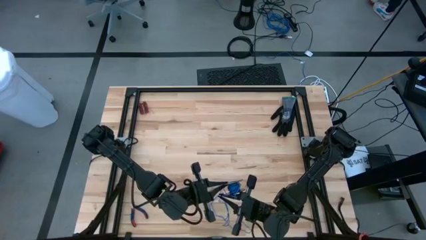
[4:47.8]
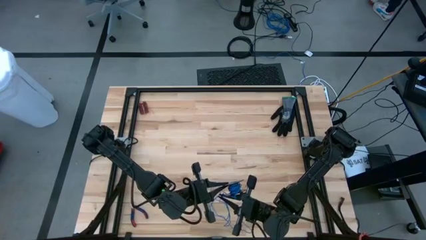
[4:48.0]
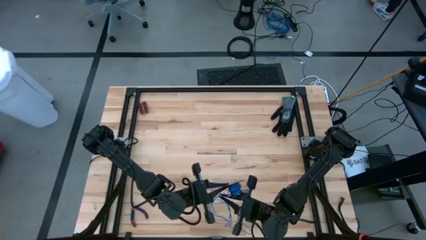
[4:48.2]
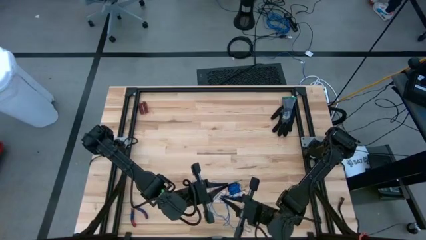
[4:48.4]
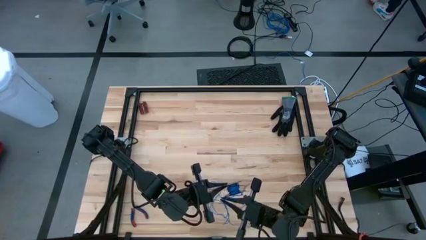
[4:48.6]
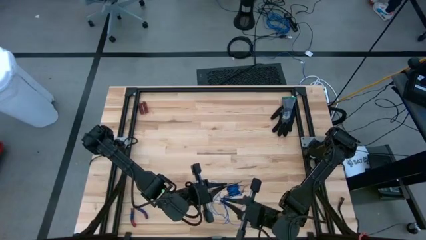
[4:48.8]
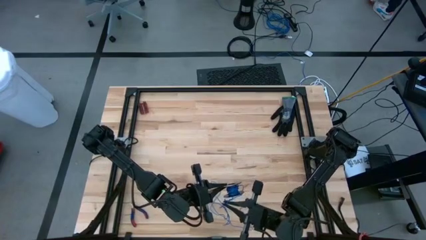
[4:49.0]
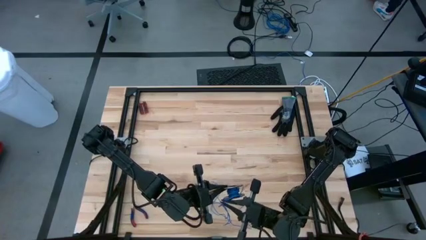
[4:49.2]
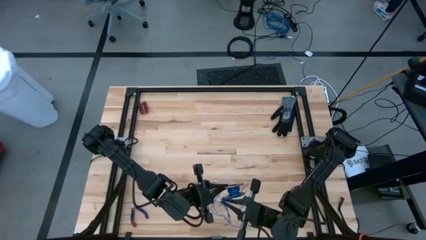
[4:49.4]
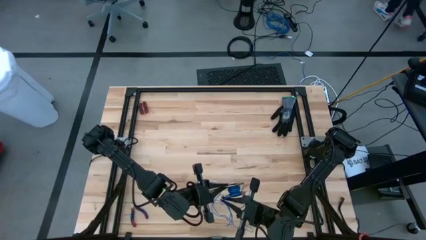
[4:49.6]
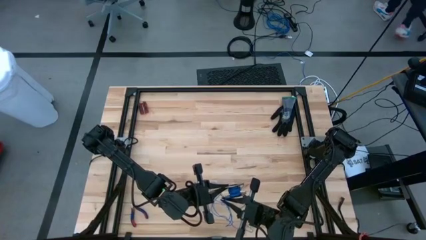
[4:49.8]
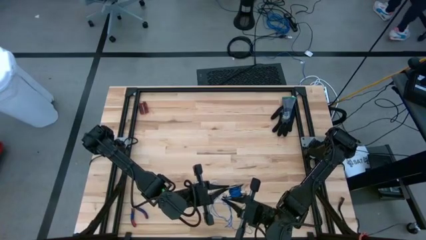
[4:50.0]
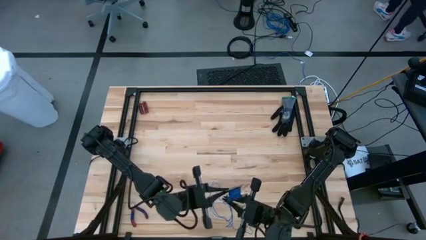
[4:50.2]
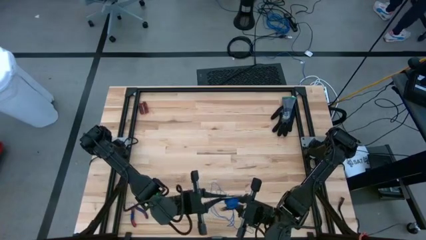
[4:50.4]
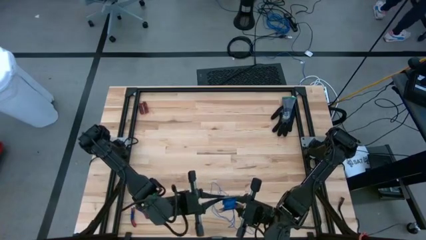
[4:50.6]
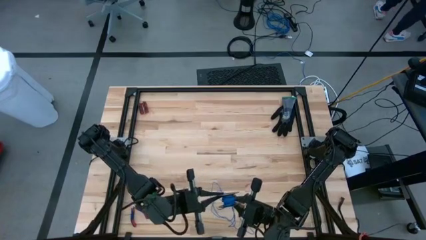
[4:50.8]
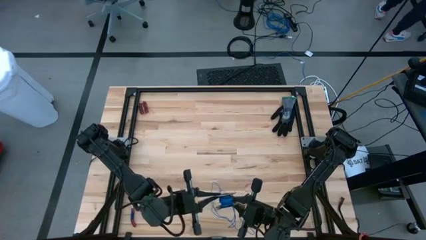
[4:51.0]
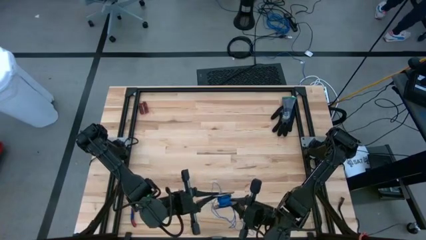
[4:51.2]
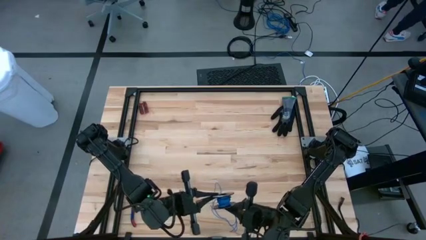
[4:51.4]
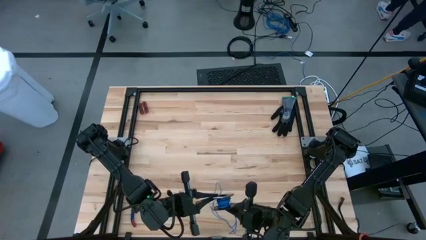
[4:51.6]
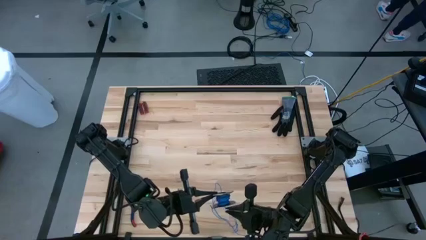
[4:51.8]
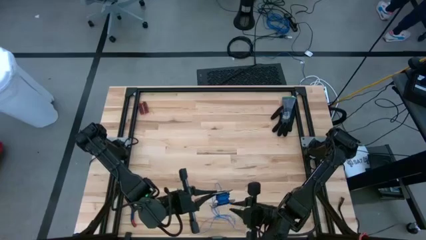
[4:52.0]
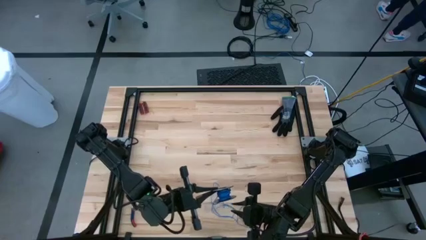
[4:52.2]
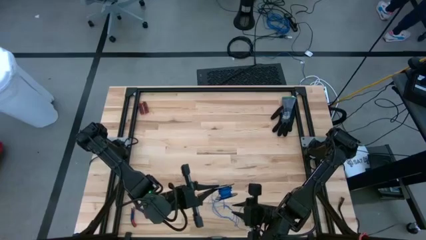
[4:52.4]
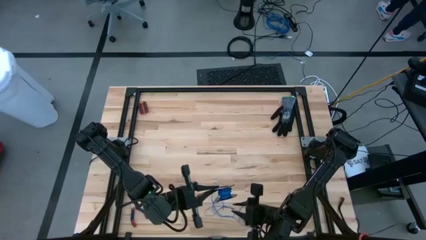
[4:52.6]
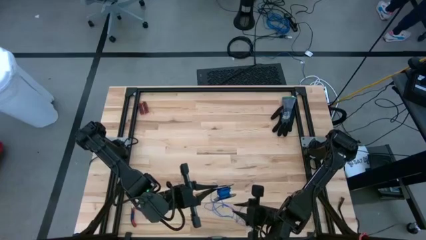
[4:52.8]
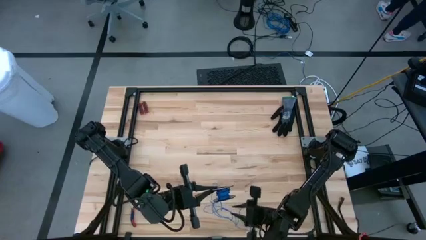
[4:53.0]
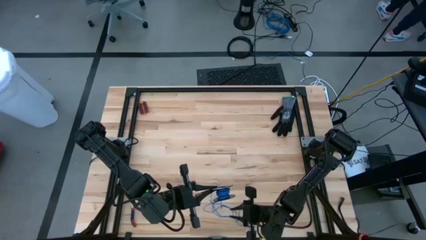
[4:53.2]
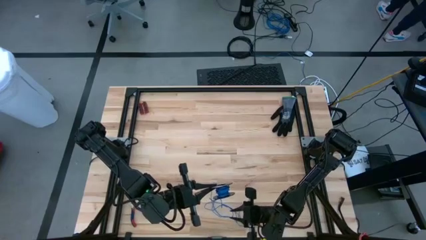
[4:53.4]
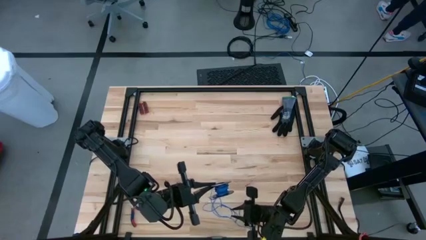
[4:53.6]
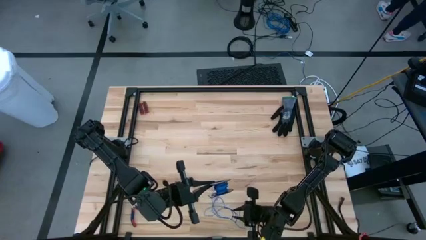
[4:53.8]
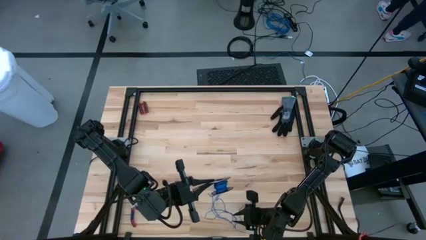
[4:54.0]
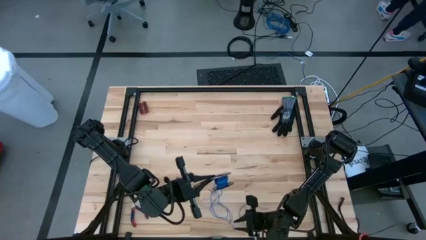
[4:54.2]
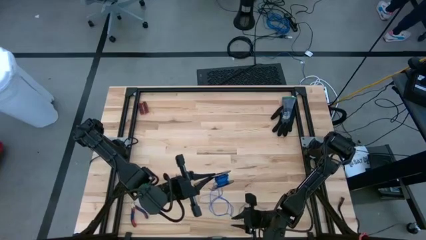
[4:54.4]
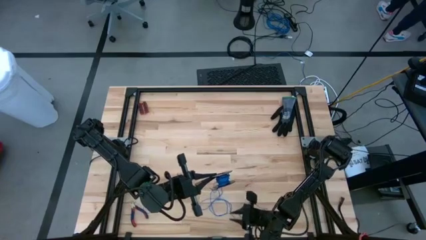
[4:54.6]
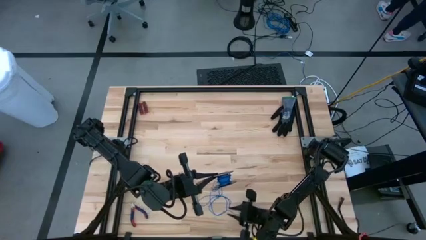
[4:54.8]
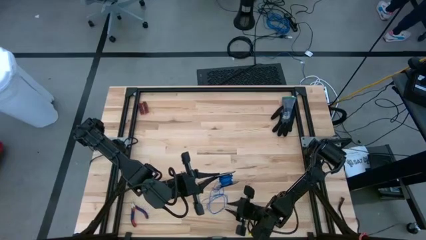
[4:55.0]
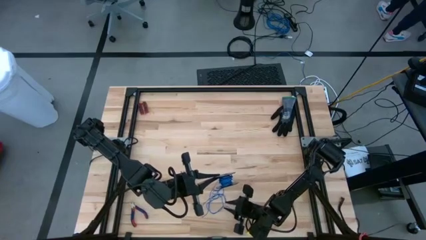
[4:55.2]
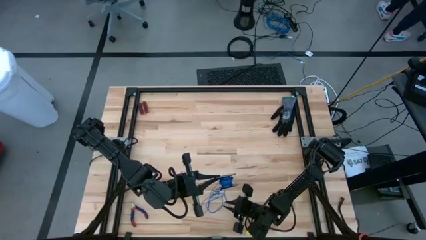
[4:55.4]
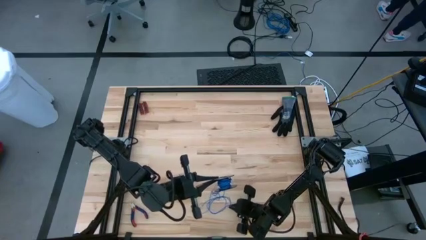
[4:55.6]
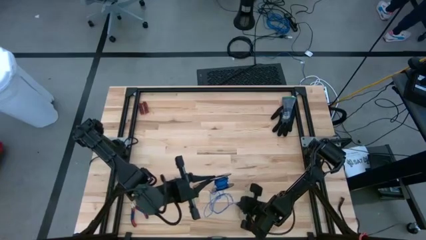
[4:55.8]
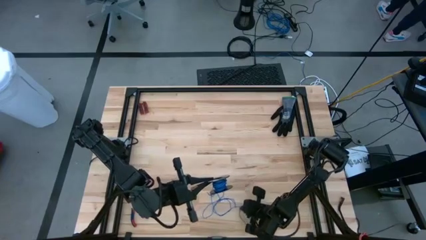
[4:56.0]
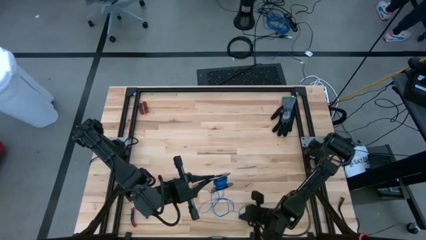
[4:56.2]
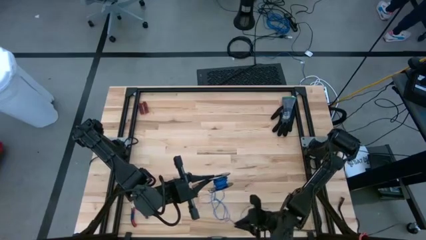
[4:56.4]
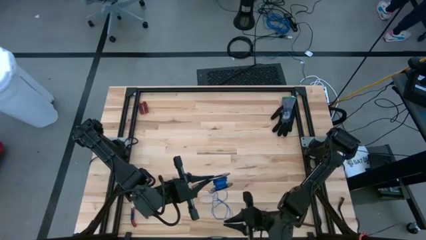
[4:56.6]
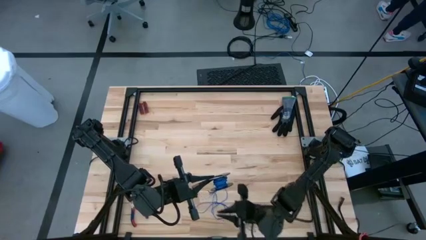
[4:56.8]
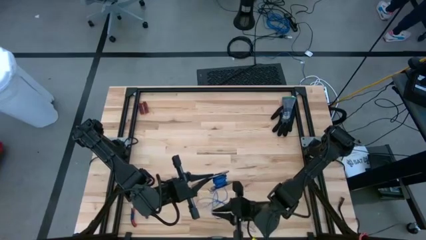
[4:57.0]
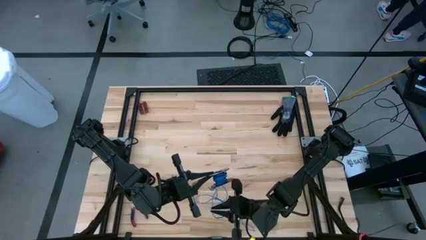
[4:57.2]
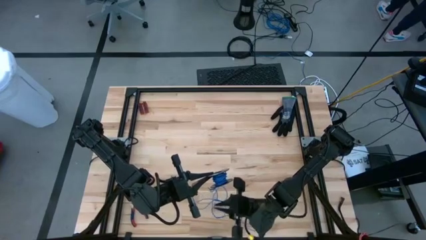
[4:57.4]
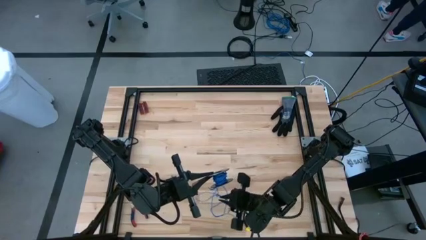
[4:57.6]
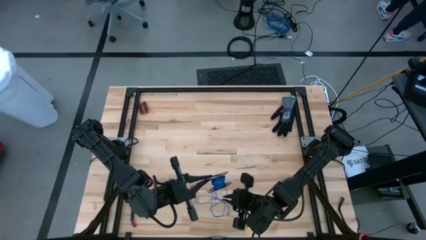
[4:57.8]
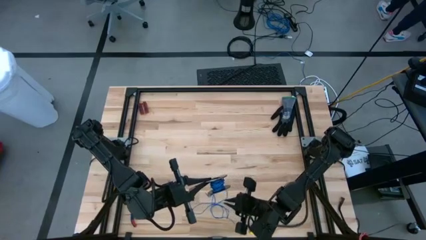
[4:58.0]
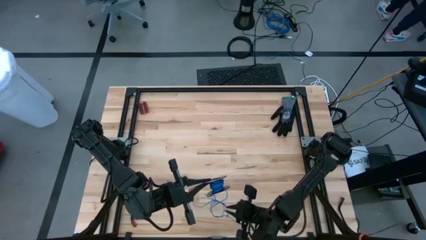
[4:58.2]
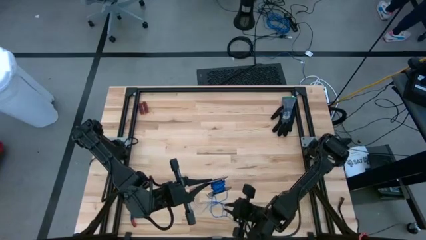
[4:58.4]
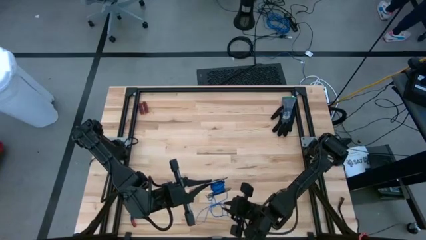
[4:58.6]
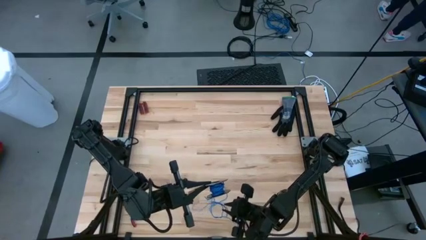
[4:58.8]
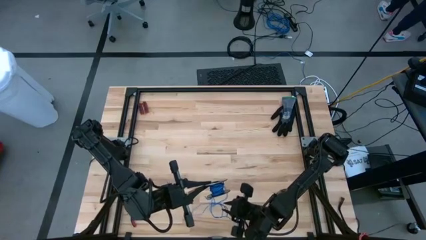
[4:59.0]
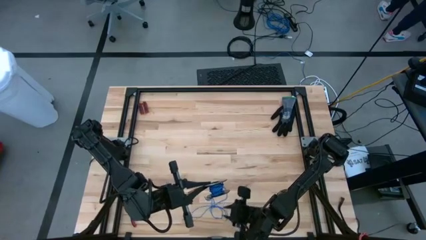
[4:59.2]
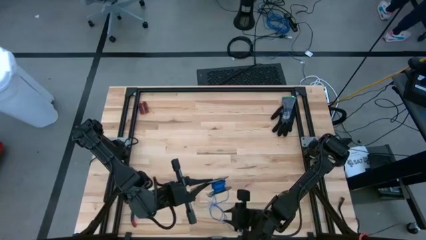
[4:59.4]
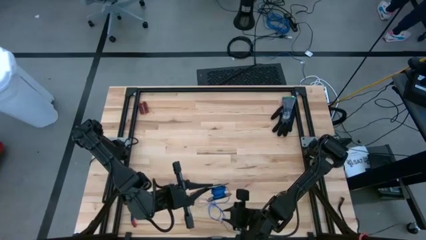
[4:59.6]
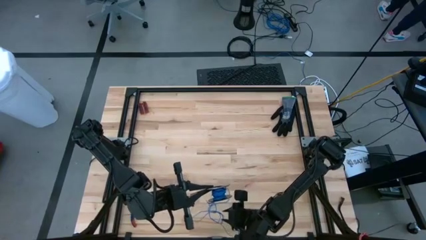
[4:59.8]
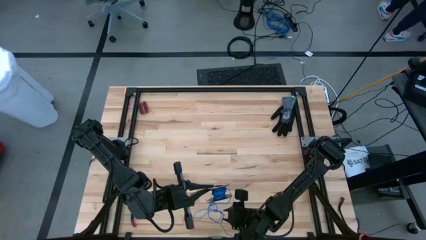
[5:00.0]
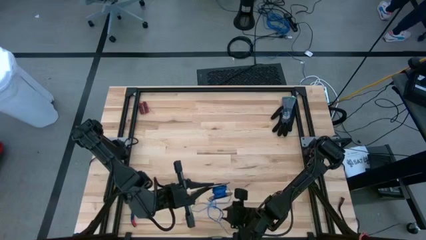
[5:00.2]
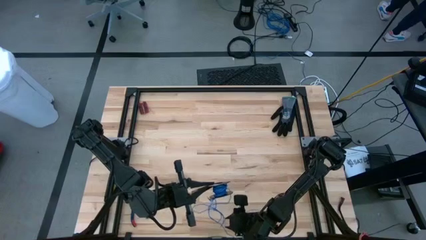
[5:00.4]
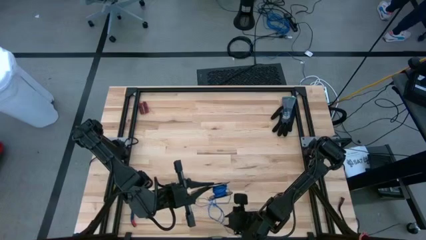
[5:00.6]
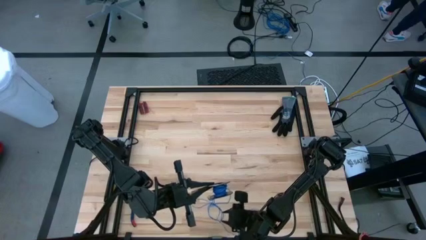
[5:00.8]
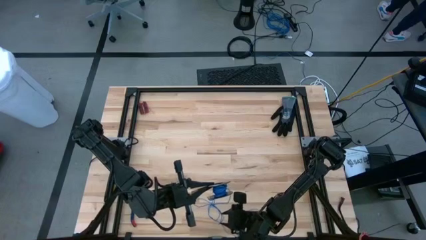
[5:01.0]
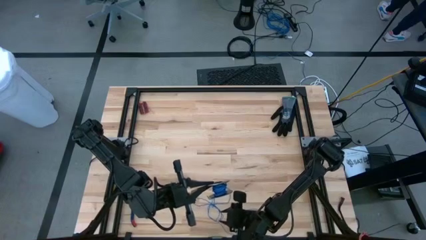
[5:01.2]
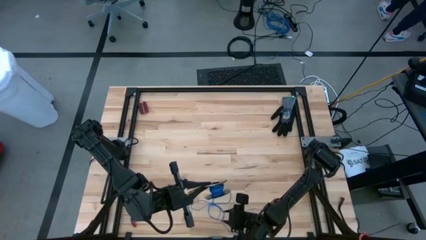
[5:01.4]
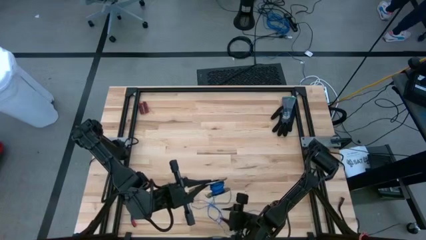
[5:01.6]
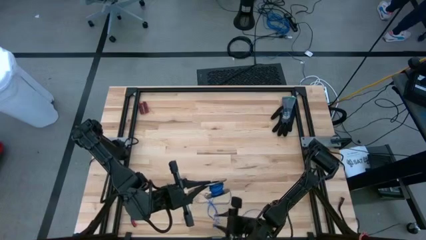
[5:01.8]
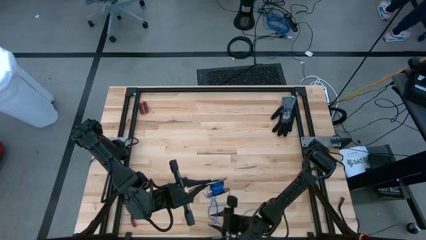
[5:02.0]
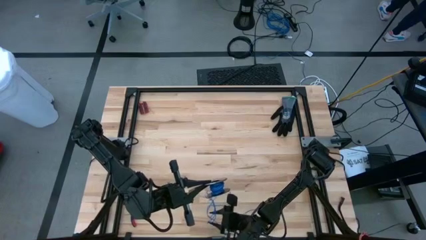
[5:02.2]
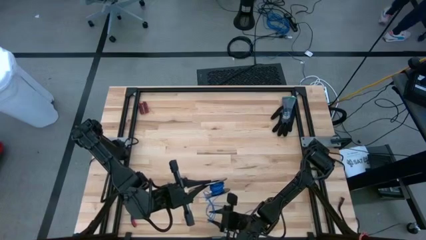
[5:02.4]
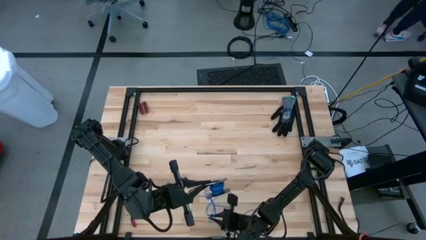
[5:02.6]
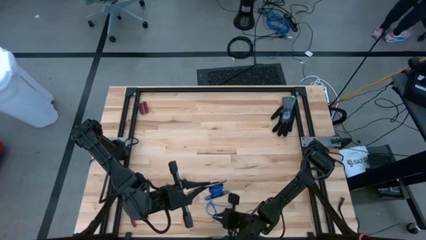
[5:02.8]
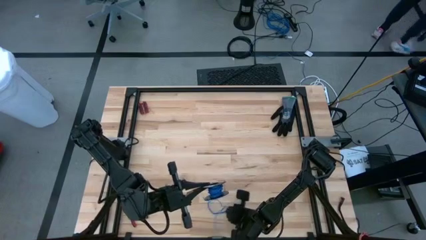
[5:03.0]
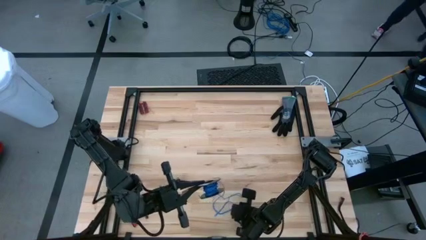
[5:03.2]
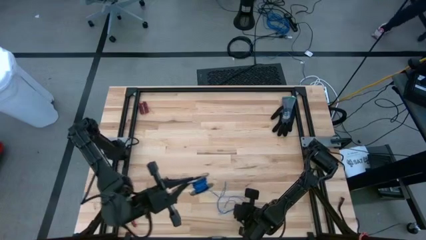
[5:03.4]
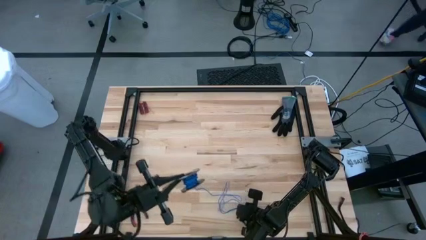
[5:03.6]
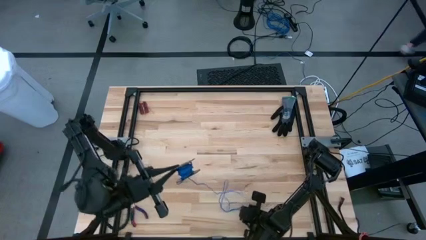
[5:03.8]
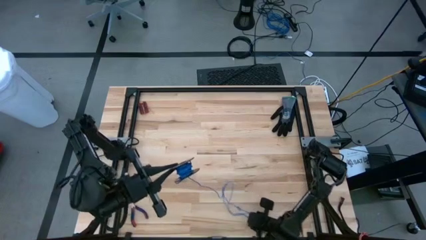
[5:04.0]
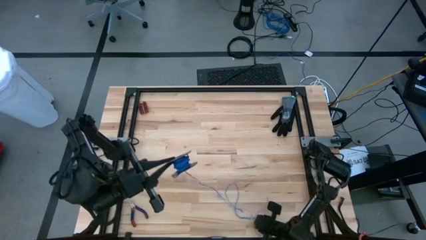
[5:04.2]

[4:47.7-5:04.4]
Task: Coil cords
Coil the blue wire onto a spool
